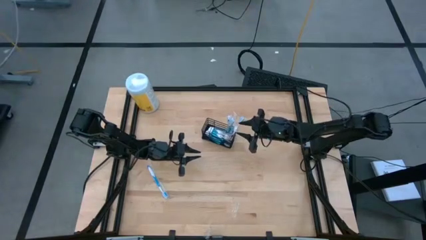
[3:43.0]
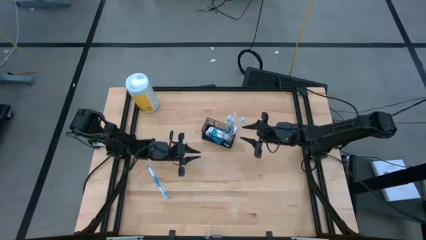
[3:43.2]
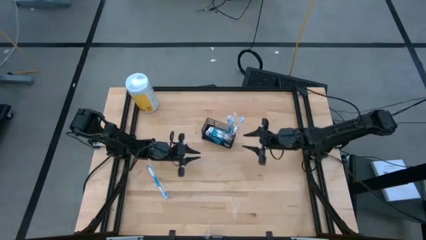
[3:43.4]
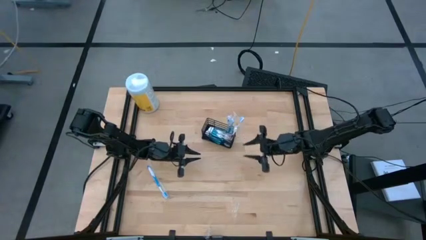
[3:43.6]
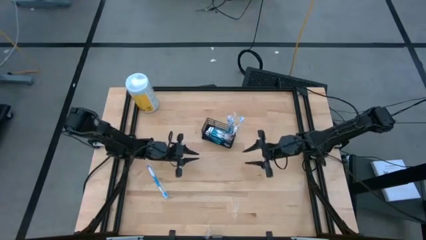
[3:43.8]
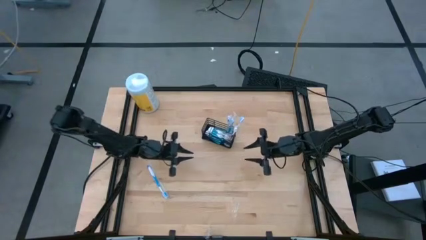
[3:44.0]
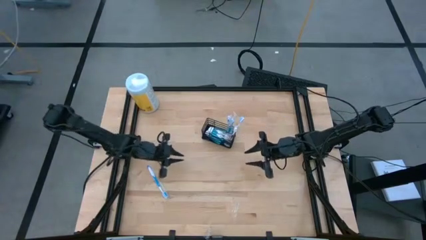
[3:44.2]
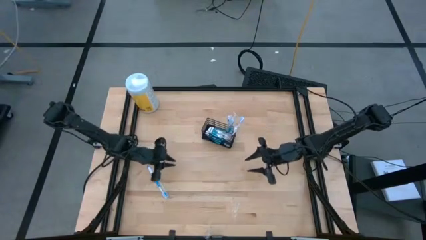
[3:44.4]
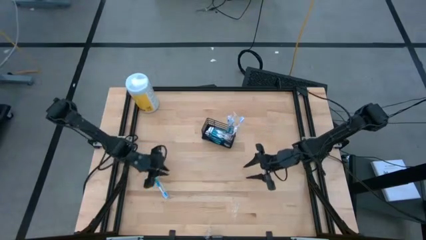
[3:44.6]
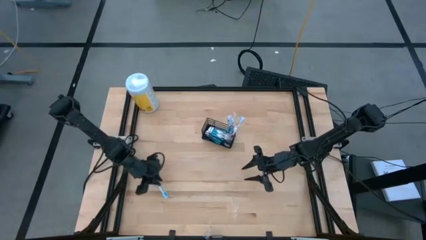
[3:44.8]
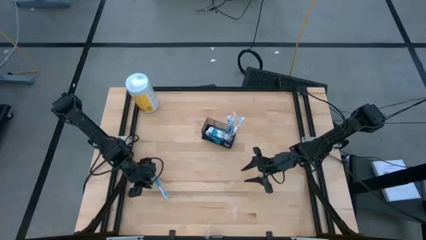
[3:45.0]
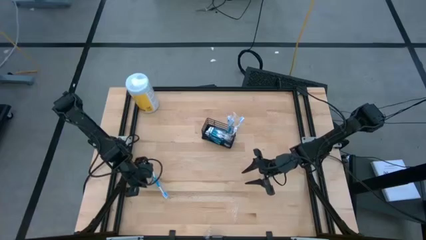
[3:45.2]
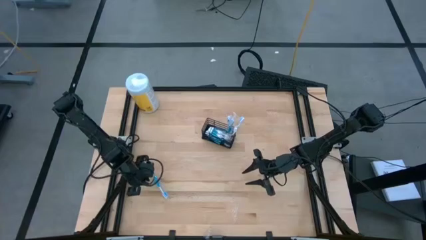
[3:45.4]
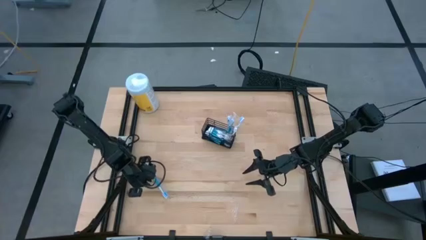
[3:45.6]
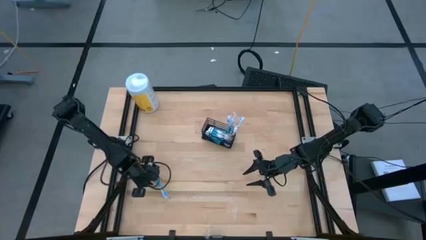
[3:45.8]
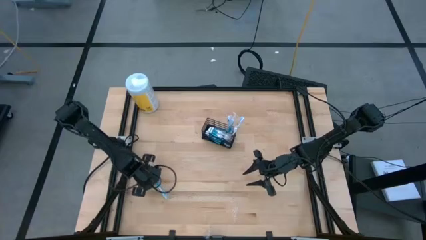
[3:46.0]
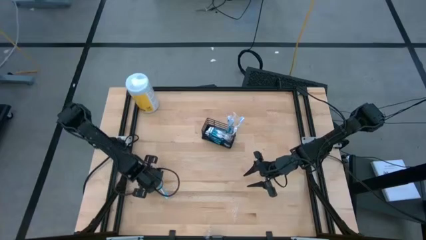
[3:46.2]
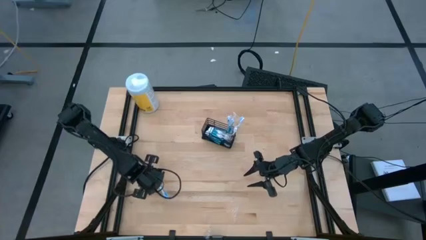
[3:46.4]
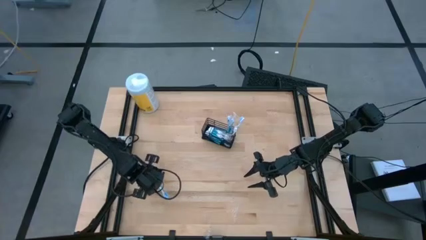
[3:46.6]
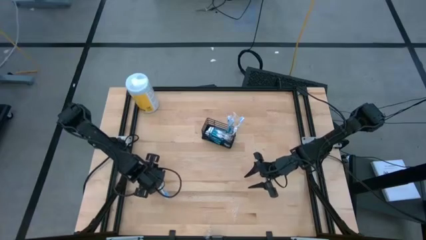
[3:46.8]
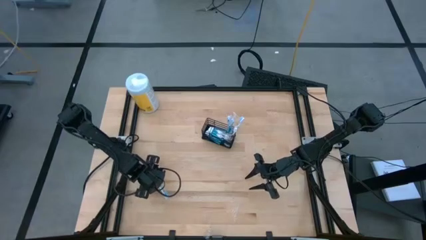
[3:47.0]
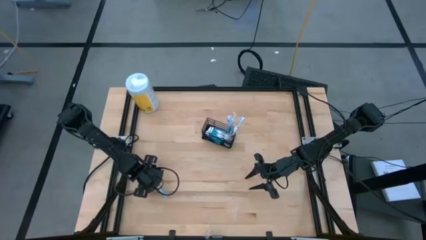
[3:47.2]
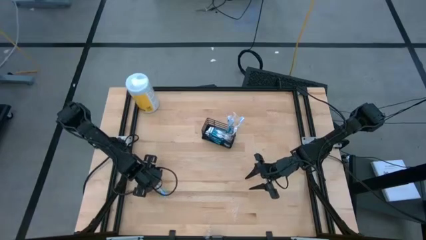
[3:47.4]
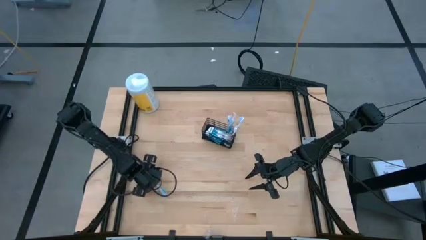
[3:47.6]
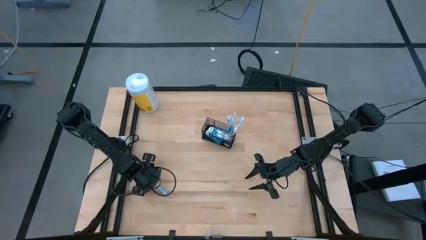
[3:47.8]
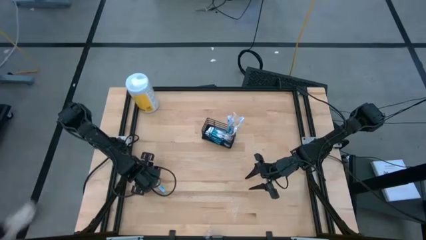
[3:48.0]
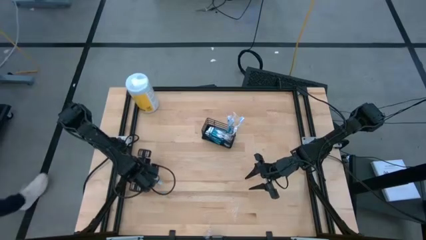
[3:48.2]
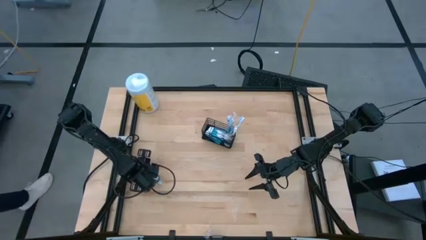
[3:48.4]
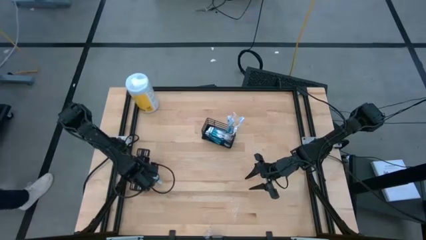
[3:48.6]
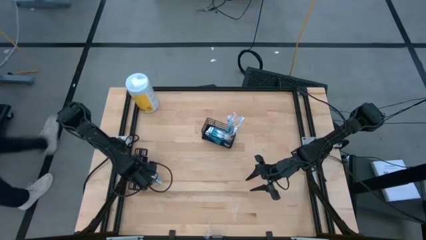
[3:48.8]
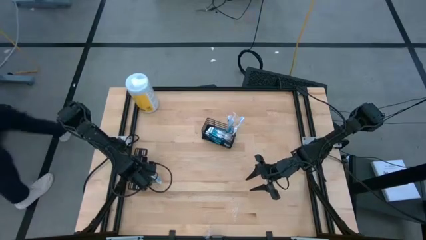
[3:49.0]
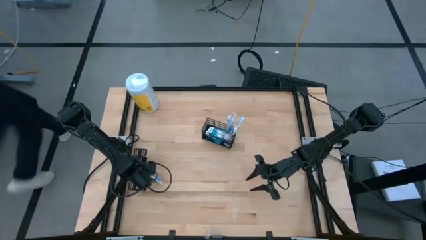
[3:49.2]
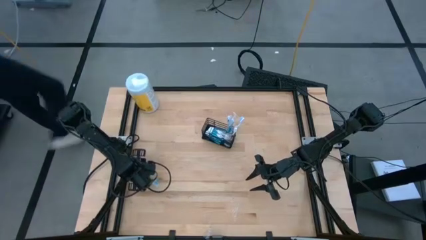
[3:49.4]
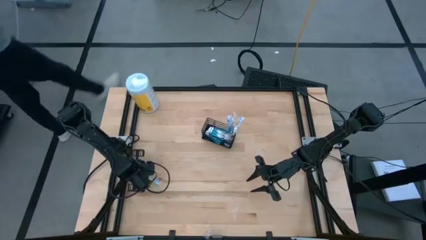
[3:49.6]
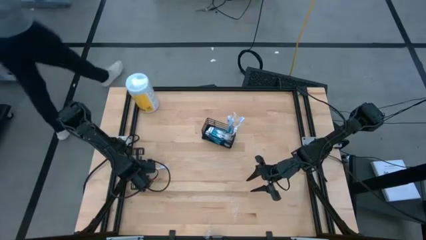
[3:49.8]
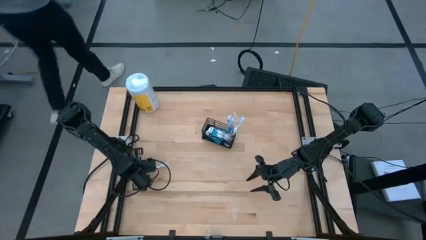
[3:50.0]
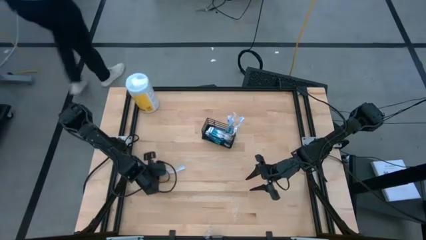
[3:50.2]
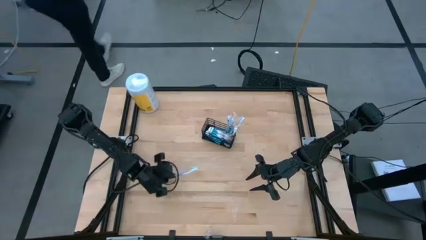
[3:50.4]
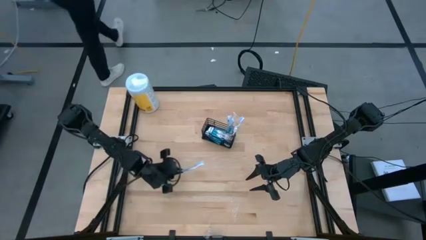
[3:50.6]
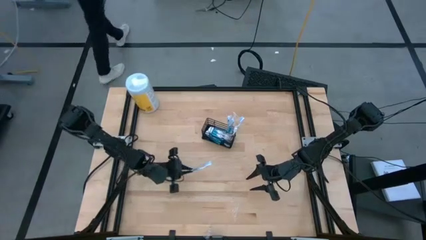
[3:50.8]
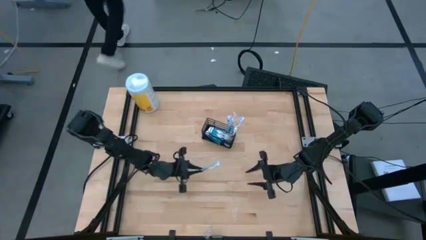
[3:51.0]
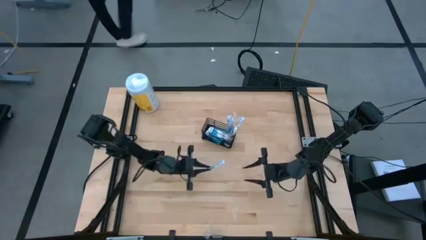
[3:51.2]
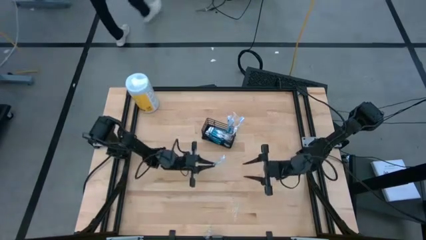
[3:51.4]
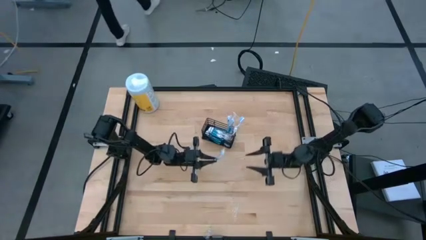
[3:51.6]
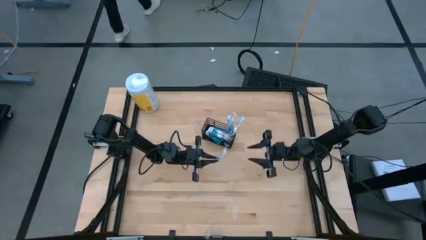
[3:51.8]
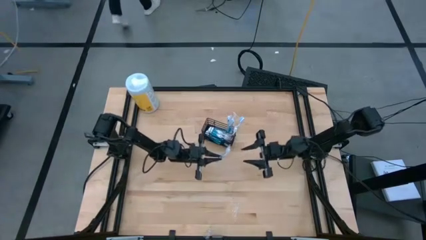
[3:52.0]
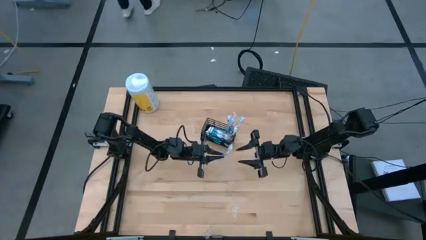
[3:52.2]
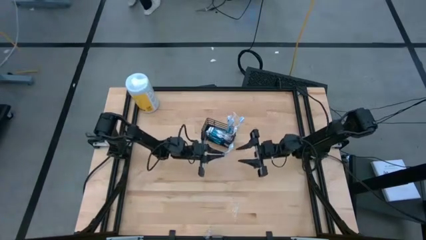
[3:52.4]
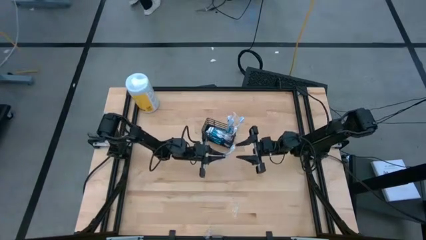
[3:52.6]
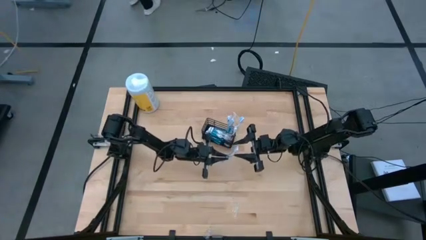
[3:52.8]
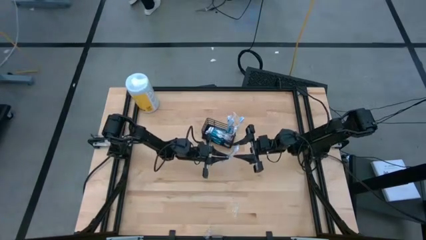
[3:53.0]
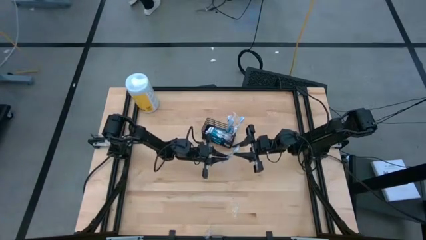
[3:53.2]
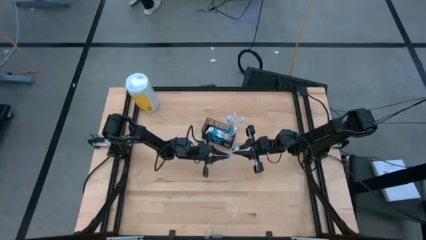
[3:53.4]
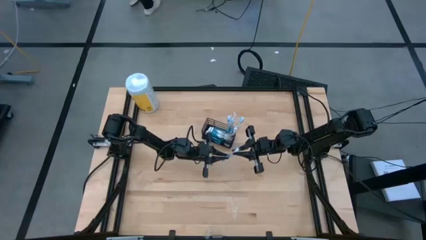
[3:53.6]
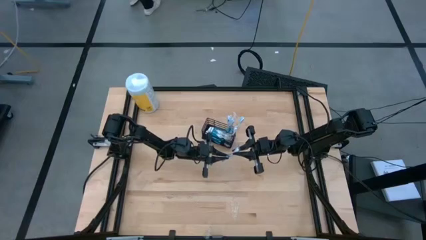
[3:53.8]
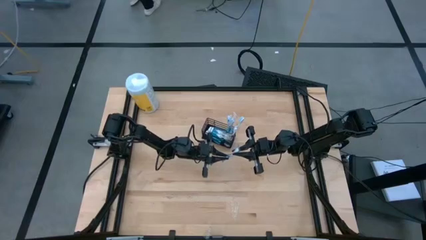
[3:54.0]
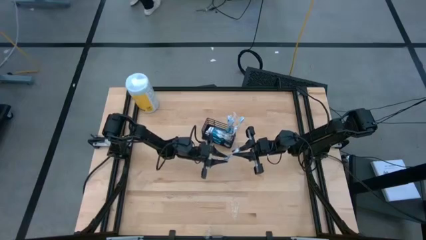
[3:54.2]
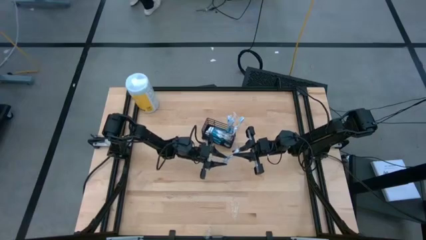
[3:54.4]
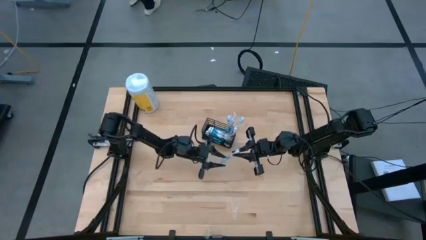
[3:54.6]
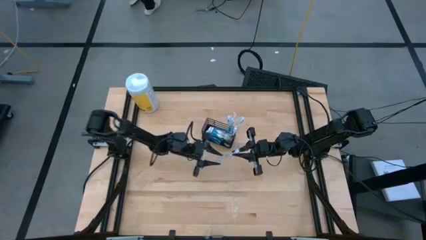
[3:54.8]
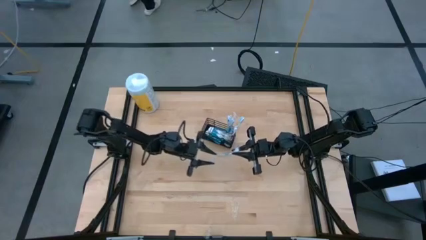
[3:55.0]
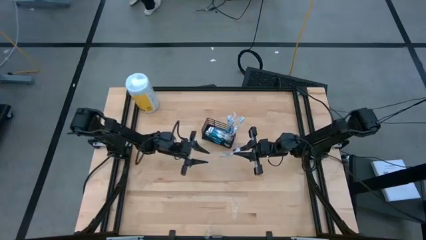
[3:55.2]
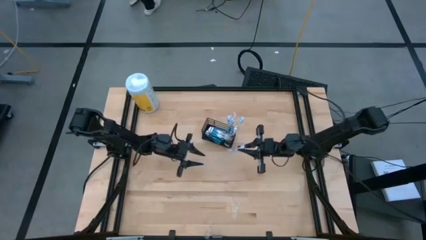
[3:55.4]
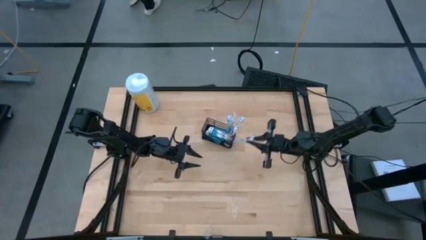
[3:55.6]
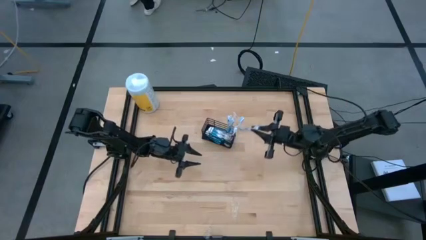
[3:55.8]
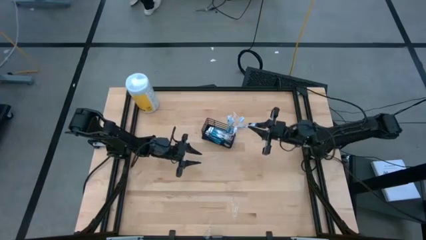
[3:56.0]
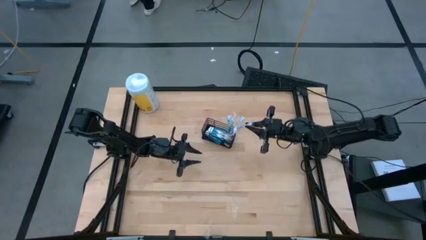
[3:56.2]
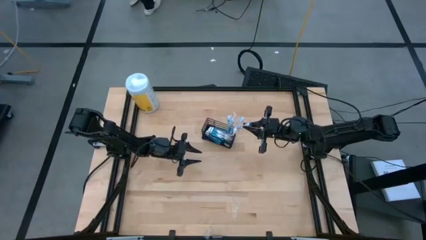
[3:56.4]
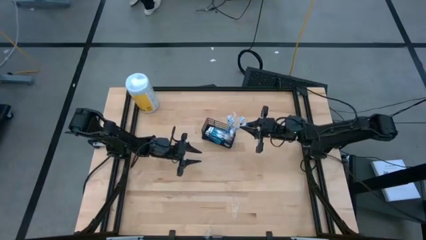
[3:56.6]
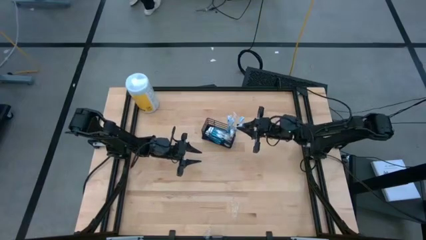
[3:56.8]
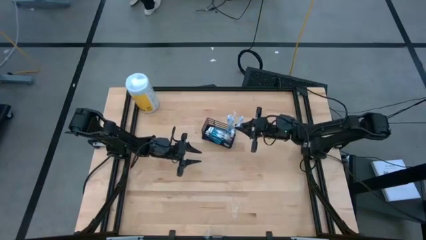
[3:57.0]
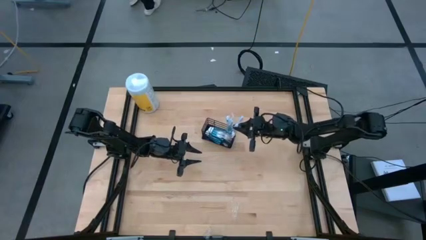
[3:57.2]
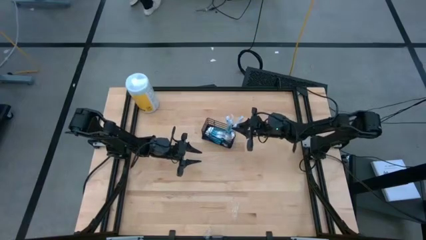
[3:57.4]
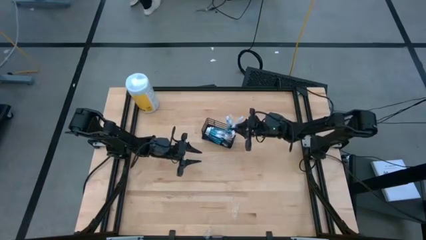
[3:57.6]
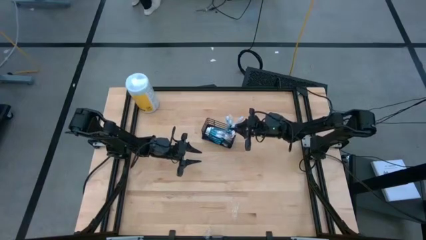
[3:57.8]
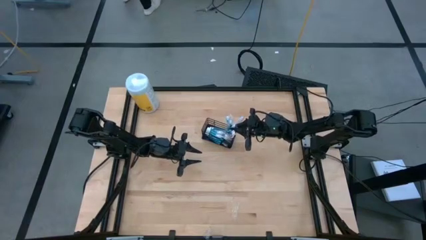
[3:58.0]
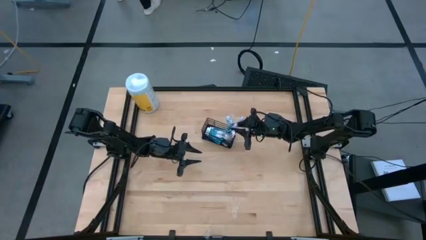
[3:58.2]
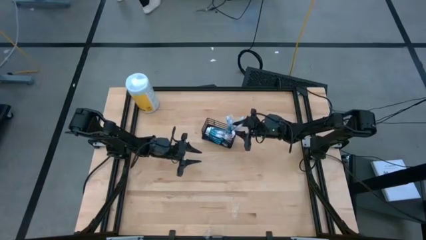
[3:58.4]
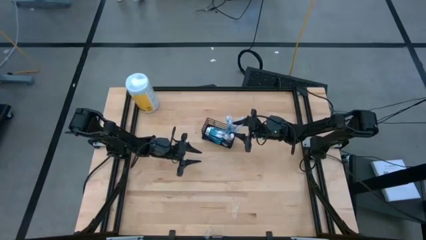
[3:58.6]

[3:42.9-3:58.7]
Task: Pick & Place toothbrushing station
Put the blue toothbrush into the wire organizer

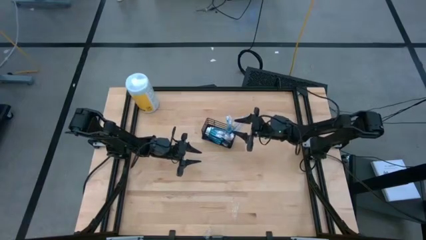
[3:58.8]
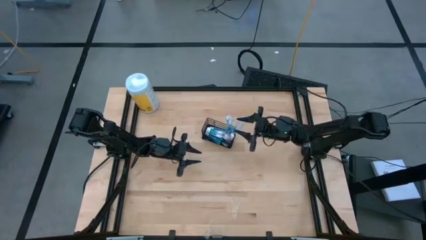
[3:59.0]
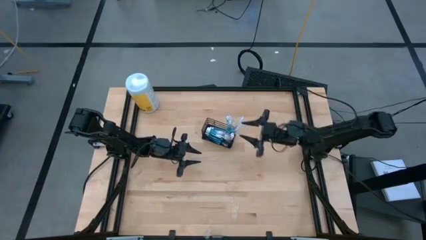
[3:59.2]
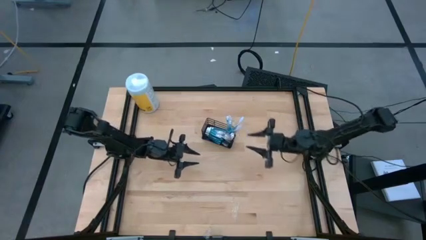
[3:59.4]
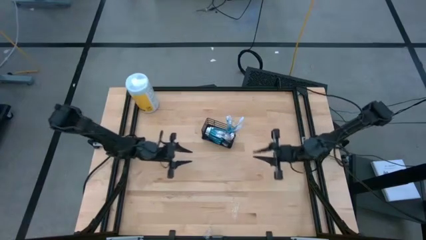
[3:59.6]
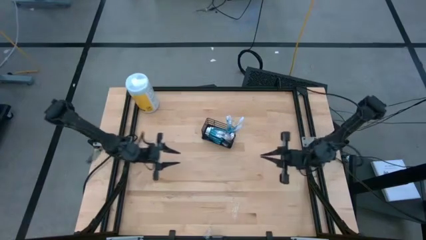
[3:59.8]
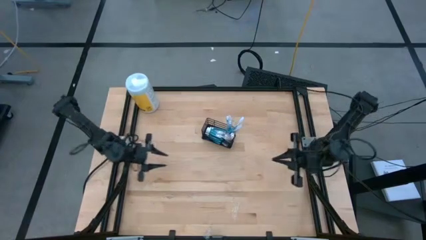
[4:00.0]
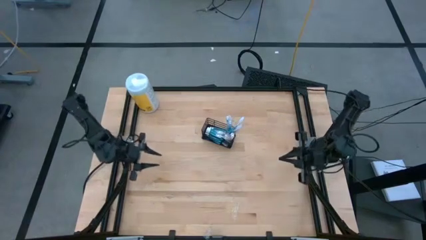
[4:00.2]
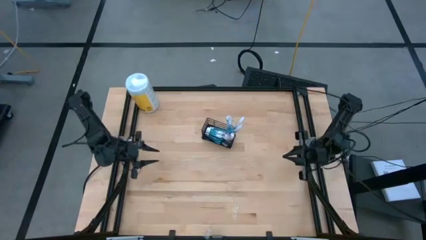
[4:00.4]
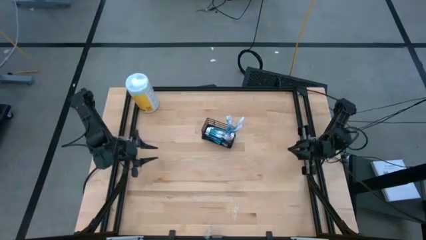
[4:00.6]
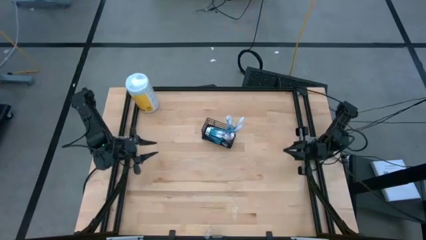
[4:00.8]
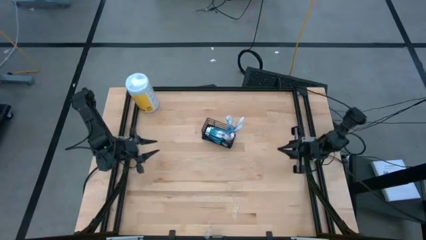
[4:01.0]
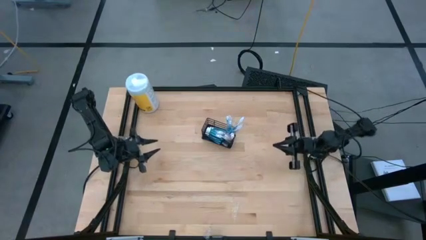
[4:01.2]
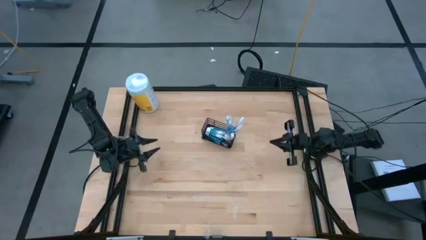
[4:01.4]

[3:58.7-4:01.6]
Return to Home Position
